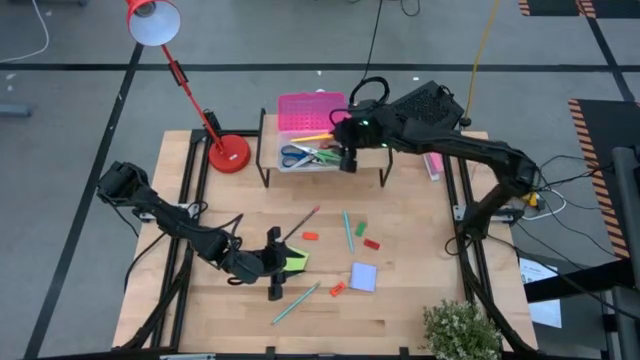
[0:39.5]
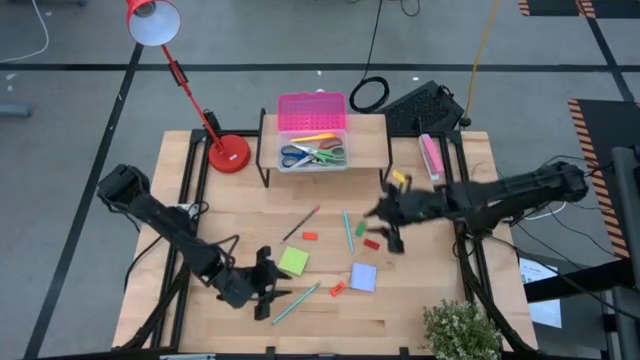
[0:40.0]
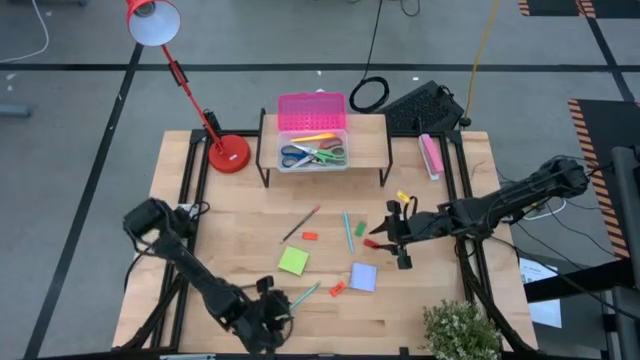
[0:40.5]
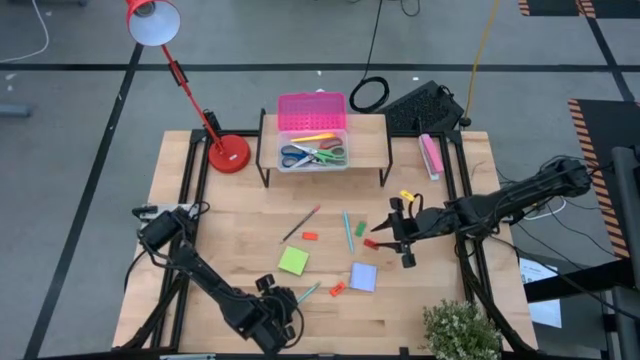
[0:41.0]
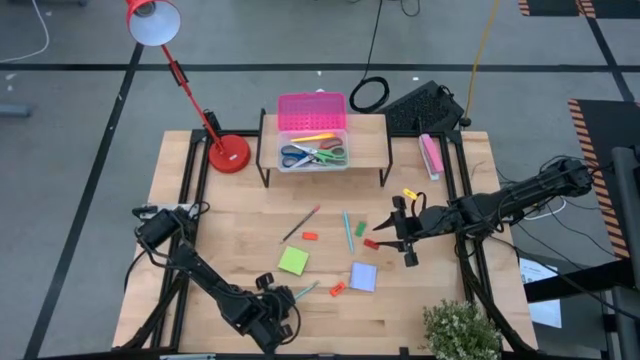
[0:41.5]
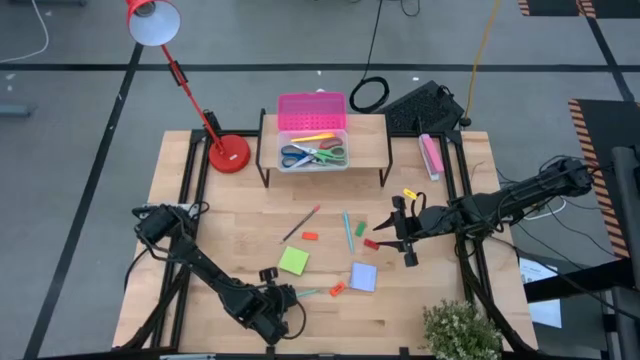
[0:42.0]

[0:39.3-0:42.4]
Task: Pack school essentials
Put the light blue pencil into the supply box on the shelf

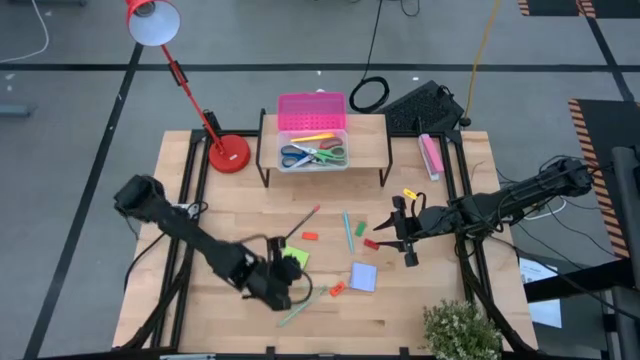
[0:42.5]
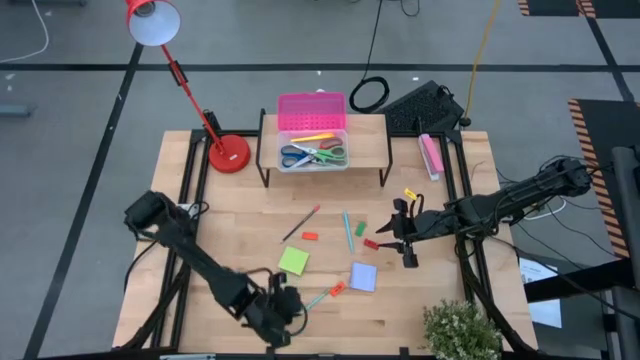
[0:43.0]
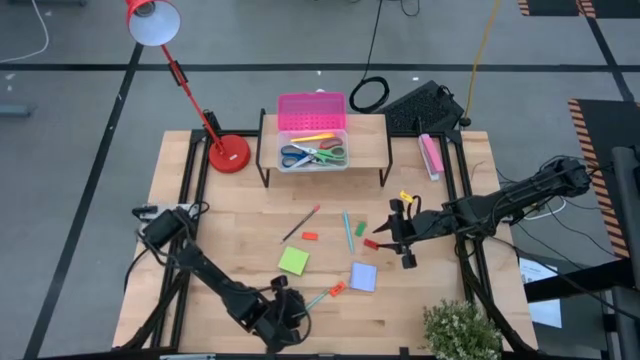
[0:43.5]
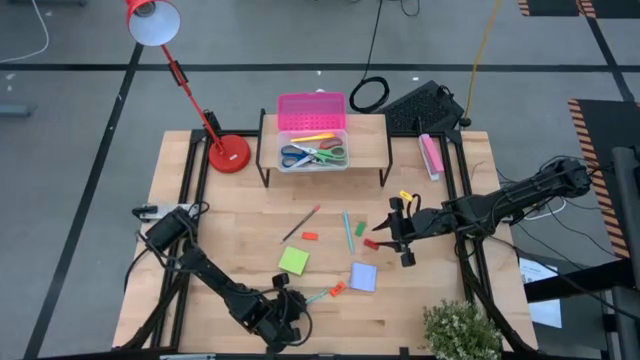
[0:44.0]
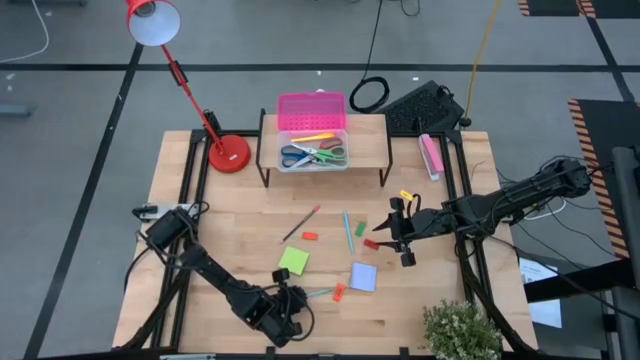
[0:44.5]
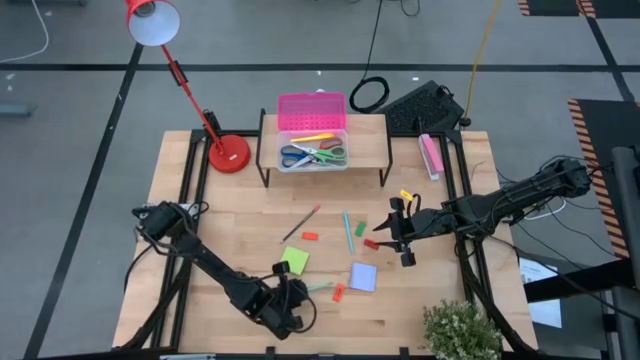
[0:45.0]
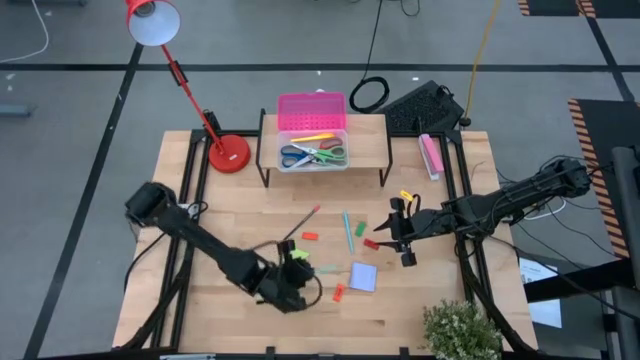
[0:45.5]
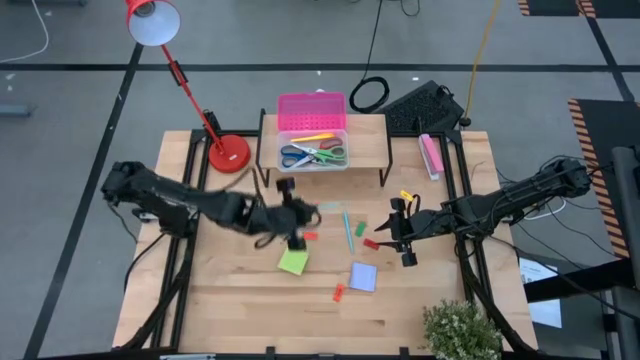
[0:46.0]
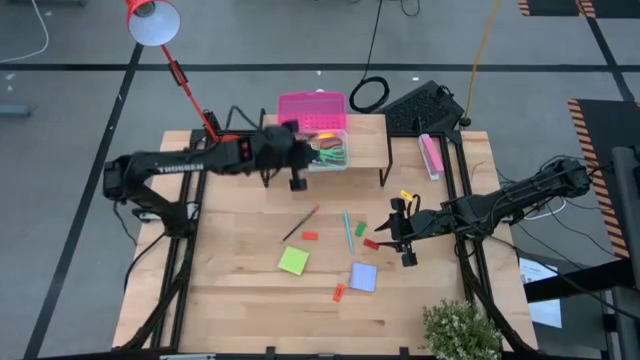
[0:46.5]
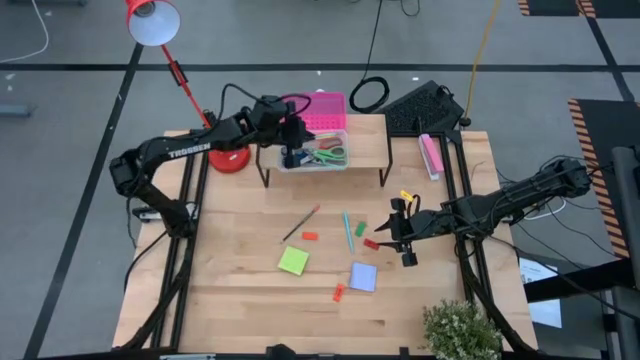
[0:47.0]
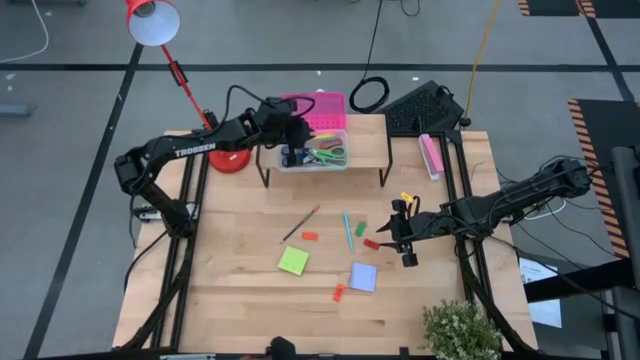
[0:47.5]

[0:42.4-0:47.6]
Put the light blue pencil into the pink supply box on the shelf

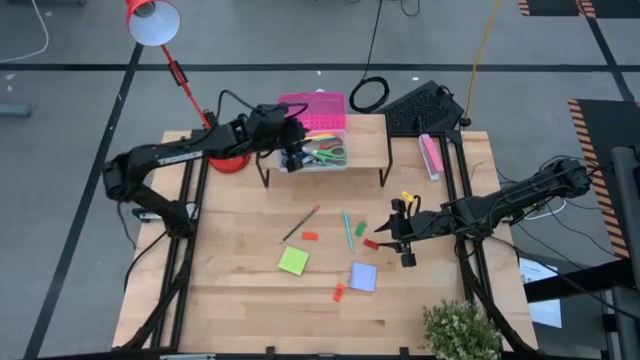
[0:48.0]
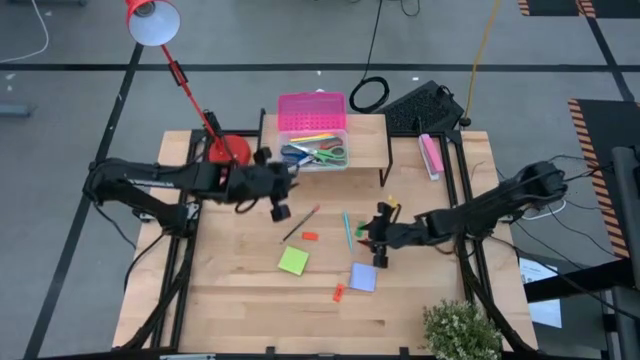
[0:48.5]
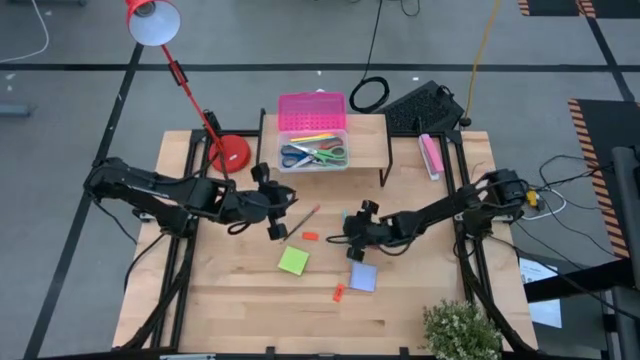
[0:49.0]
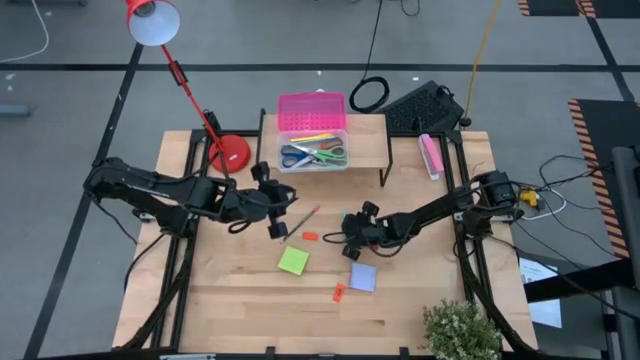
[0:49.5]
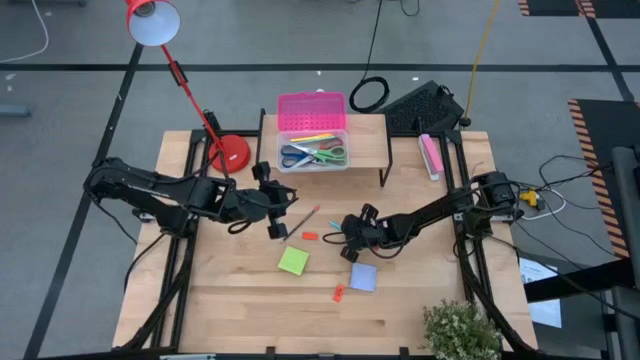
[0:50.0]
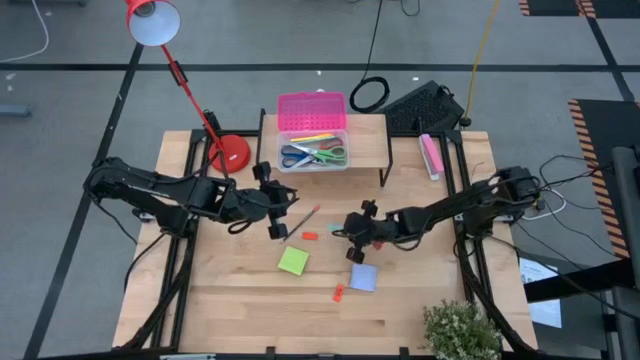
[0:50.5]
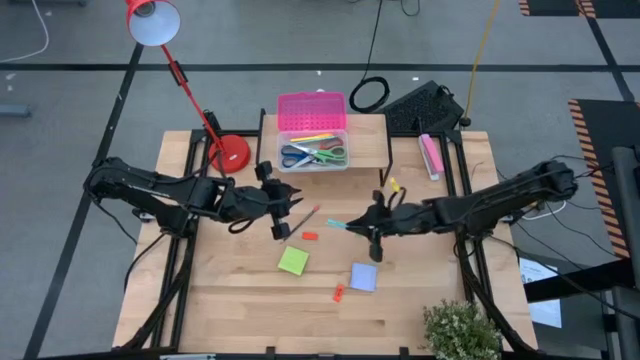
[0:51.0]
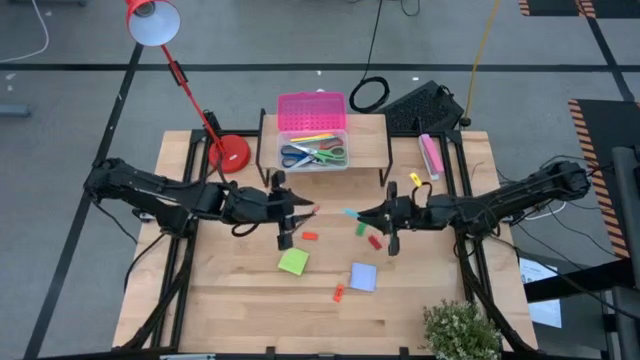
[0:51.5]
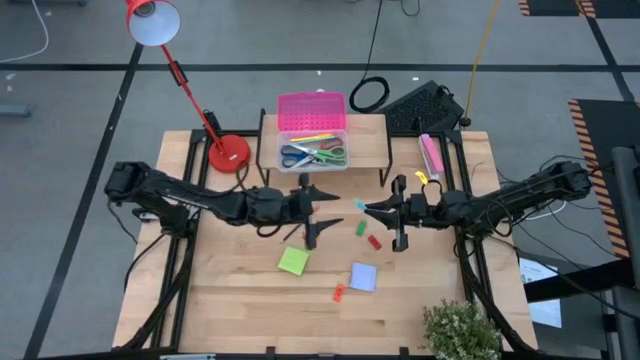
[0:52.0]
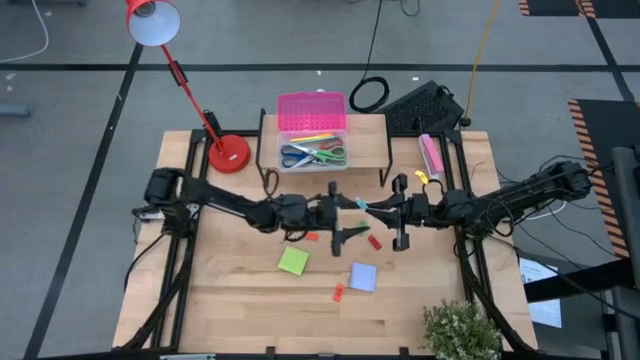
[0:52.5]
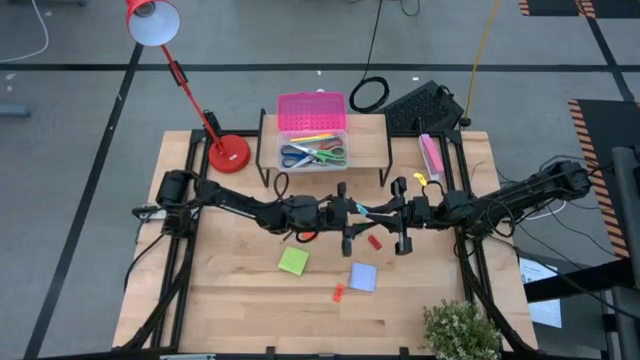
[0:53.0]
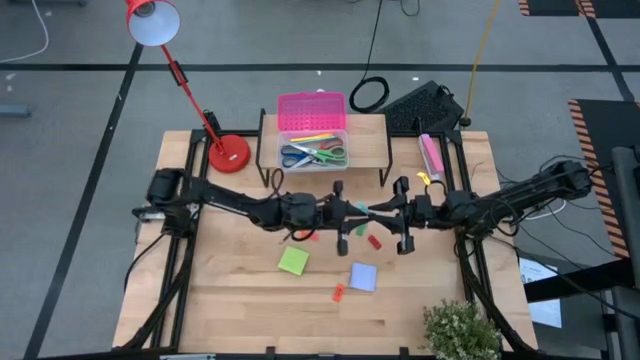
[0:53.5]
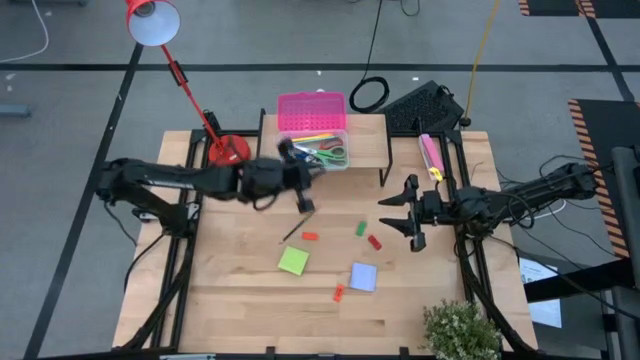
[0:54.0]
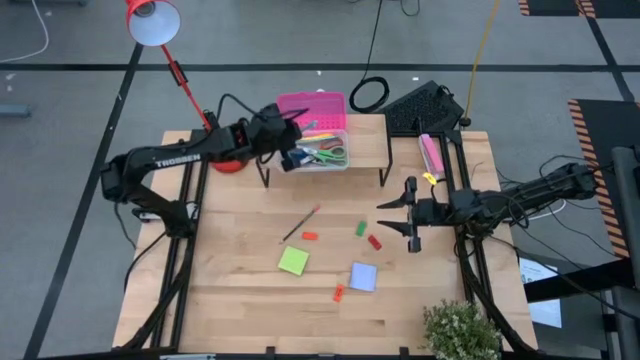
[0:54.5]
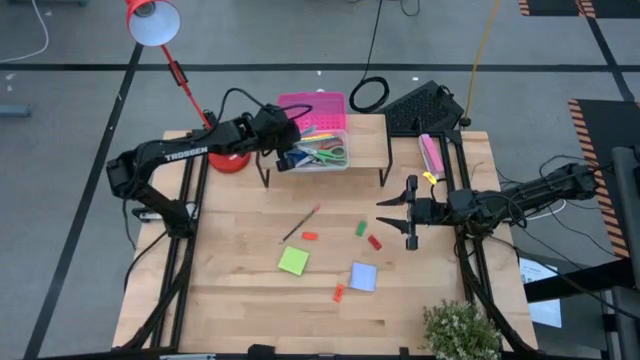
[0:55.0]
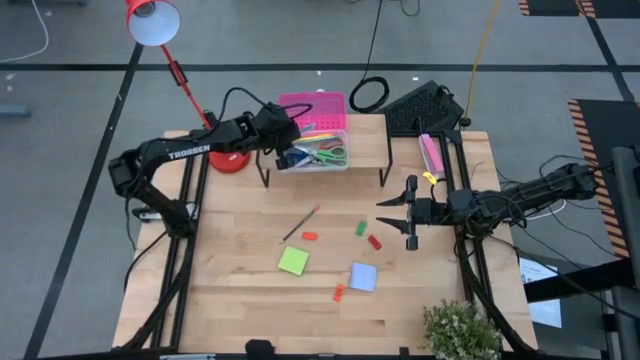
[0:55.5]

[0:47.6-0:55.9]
Put the light blue pen into the pink supply box on the shelf

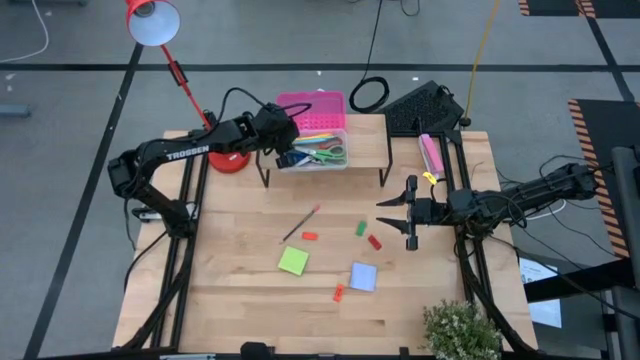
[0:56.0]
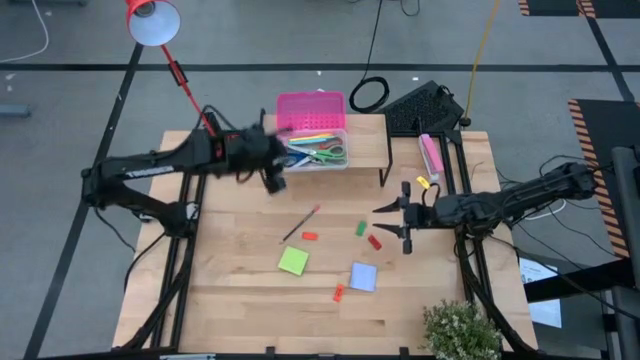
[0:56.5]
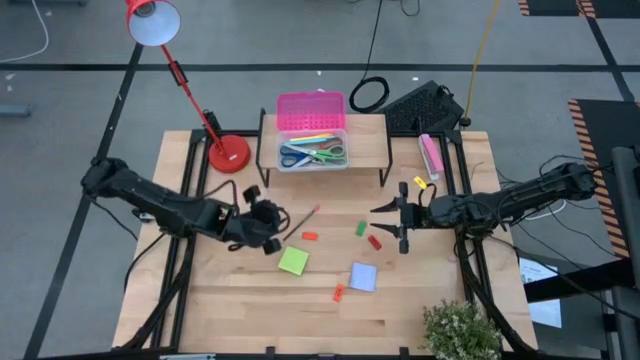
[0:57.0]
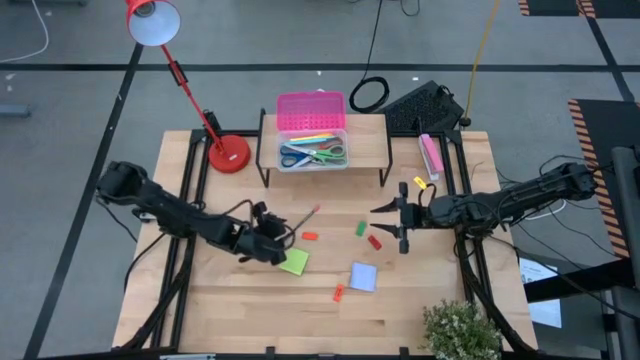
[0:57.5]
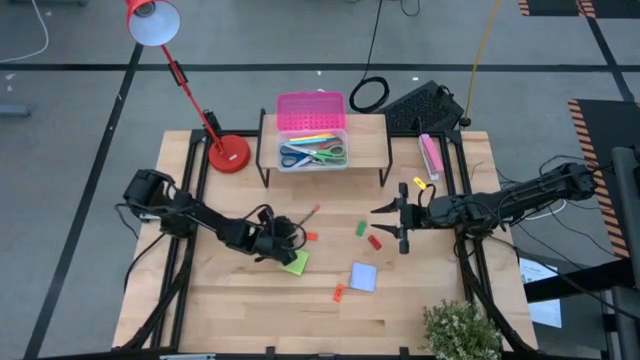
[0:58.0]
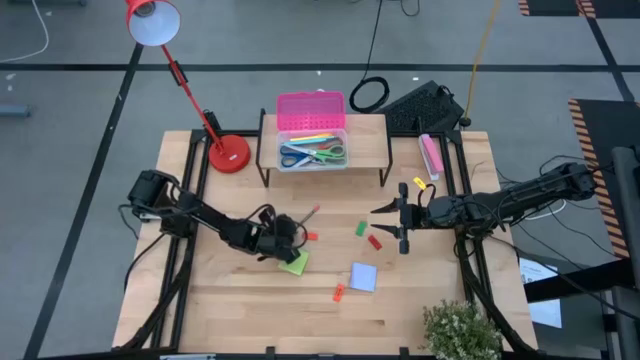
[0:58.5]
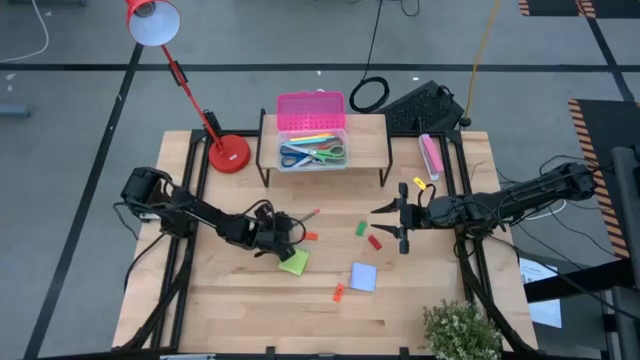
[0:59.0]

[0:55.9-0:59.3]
Put the black pencil into the pink supply box on the shelf

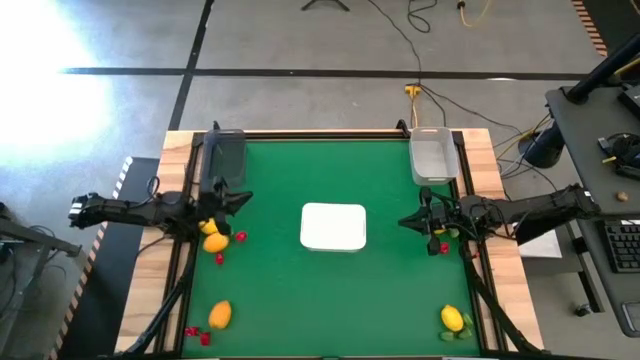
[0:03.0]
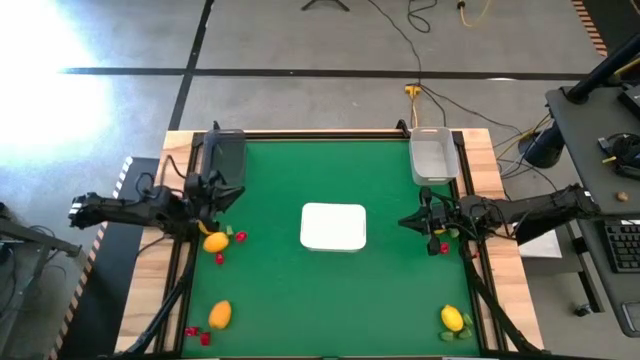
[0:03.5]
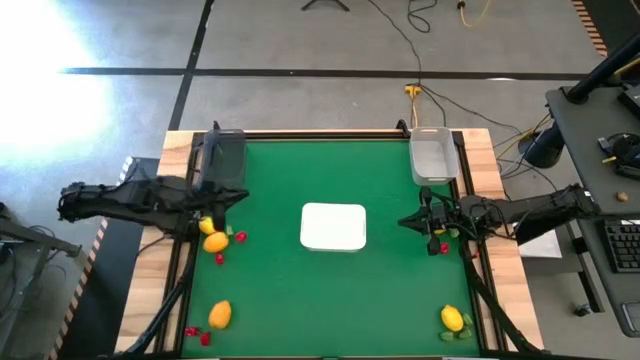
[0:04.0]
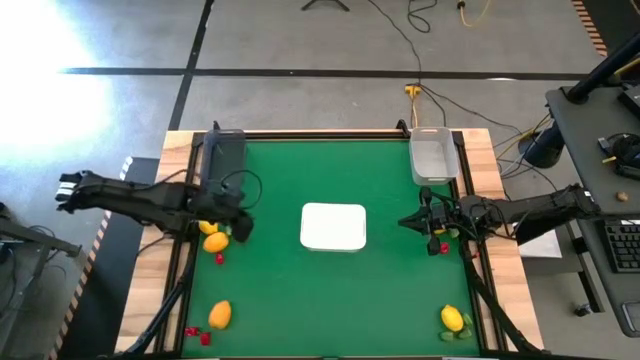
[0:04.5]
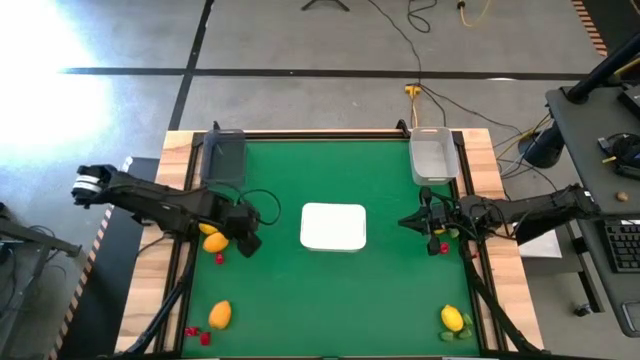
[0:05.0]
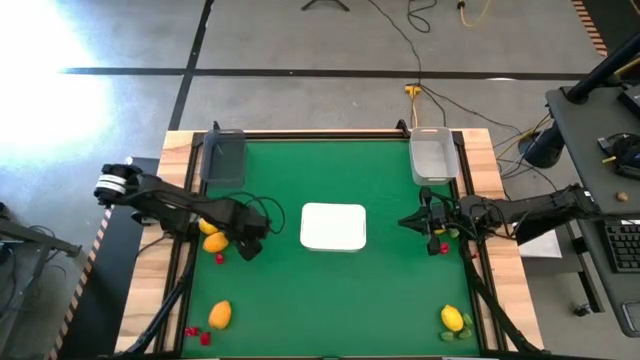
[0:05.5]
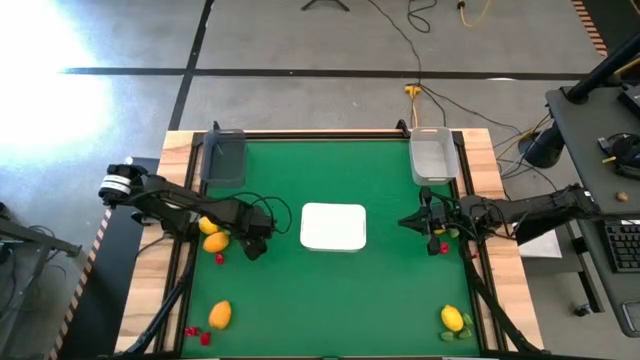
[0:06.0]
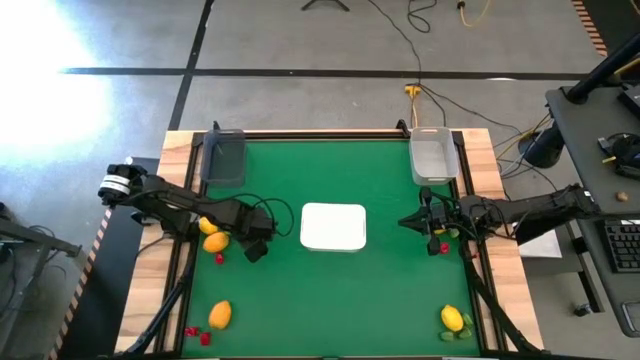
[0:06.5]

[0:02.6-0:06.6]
Task: Sort produce into baskets
Put the red chili pepper into the white bin
